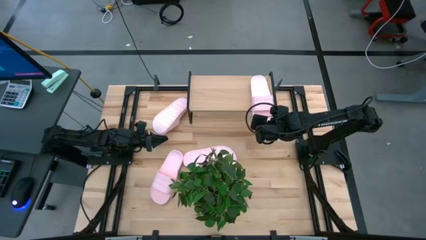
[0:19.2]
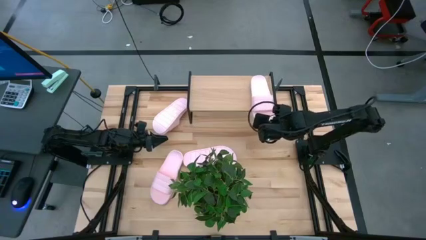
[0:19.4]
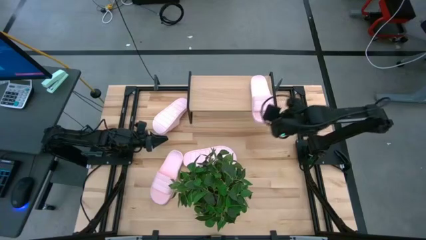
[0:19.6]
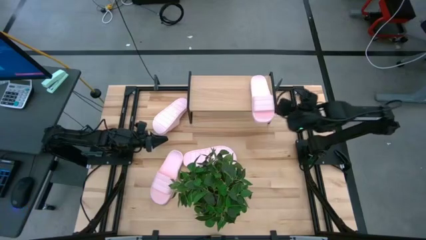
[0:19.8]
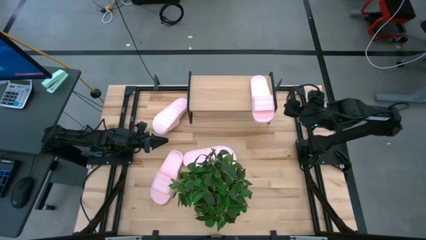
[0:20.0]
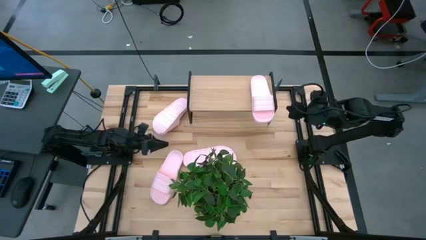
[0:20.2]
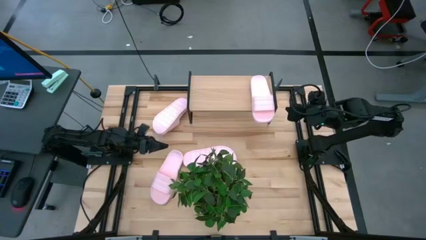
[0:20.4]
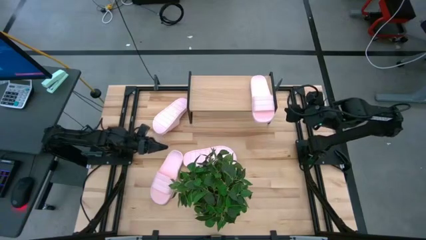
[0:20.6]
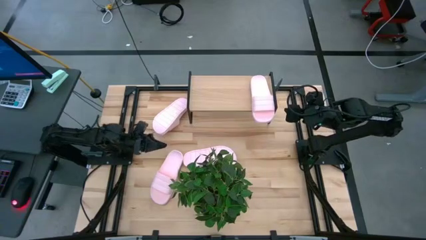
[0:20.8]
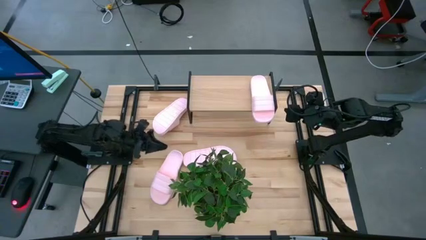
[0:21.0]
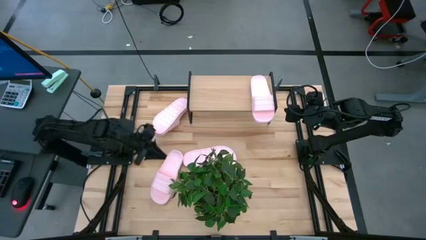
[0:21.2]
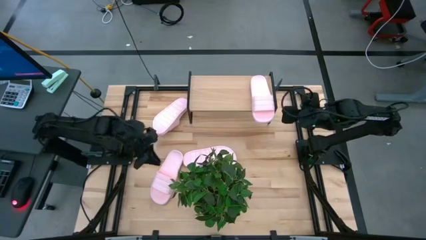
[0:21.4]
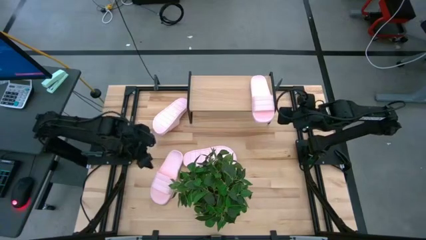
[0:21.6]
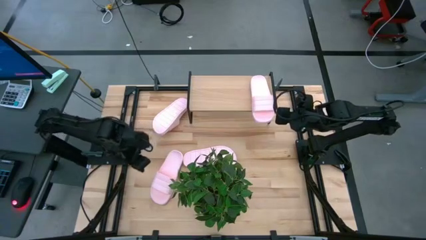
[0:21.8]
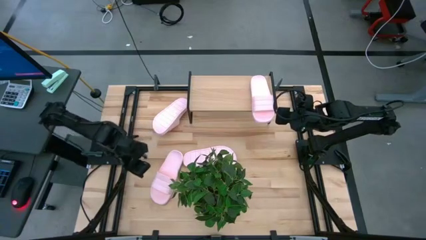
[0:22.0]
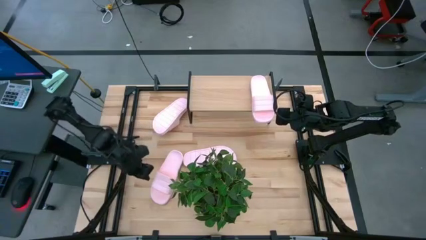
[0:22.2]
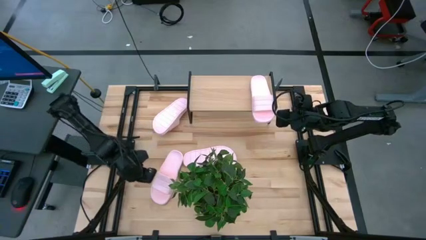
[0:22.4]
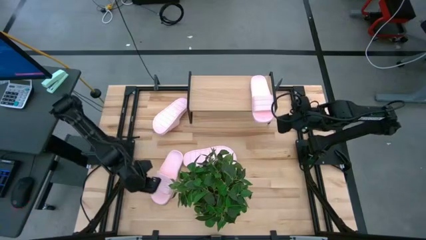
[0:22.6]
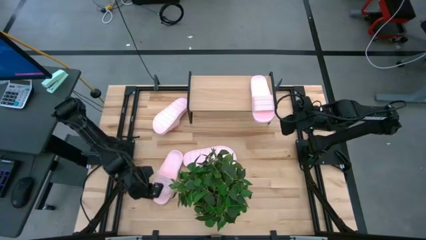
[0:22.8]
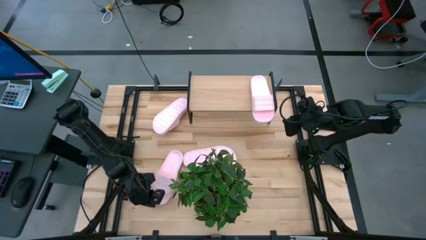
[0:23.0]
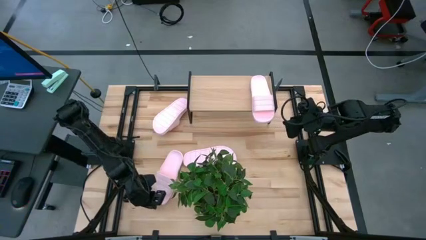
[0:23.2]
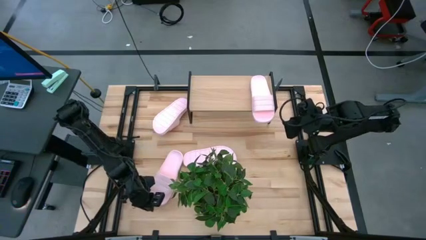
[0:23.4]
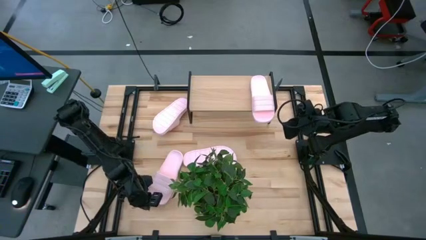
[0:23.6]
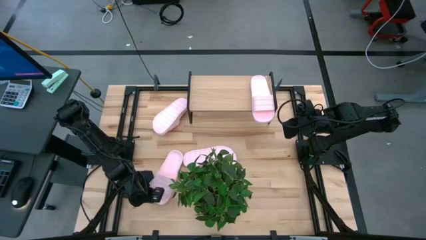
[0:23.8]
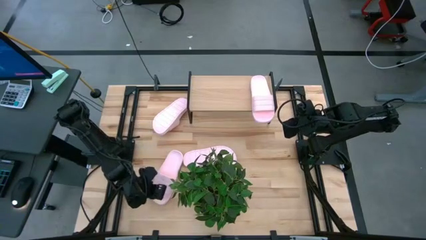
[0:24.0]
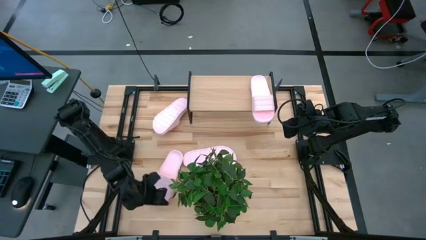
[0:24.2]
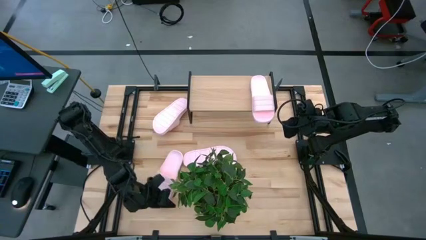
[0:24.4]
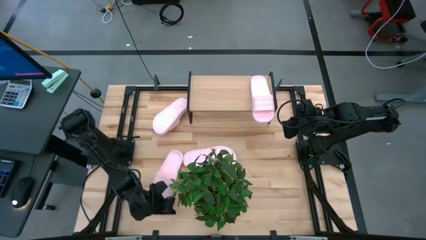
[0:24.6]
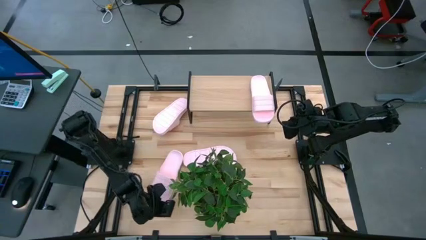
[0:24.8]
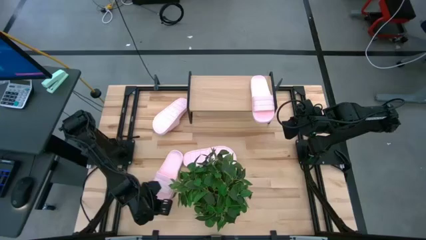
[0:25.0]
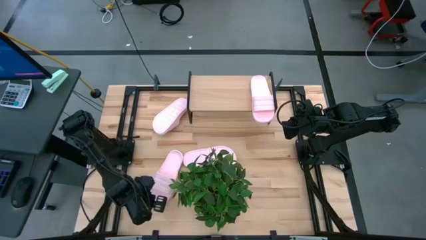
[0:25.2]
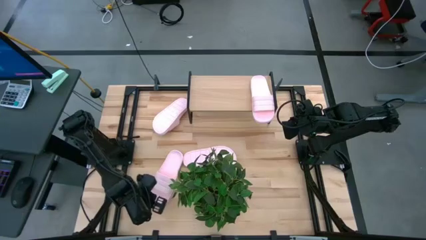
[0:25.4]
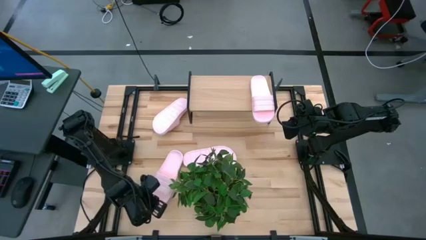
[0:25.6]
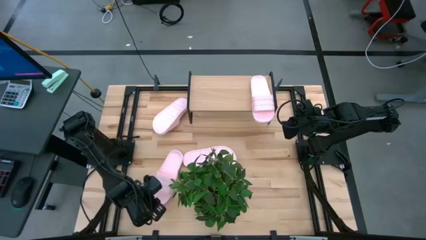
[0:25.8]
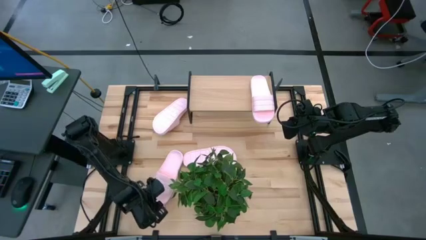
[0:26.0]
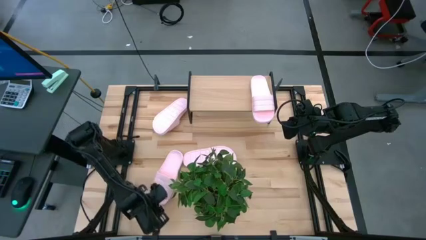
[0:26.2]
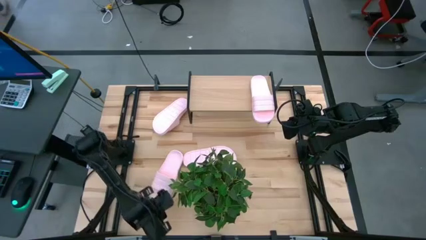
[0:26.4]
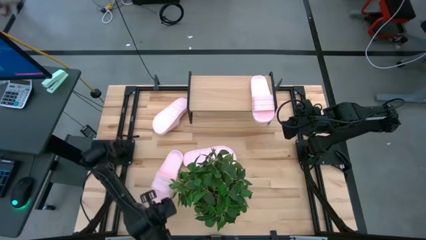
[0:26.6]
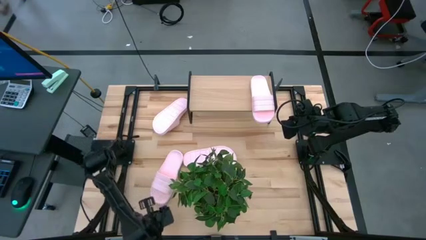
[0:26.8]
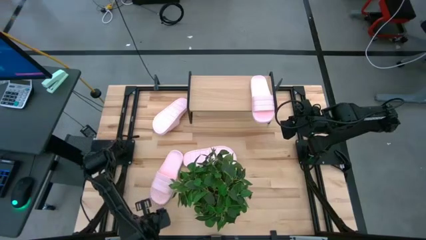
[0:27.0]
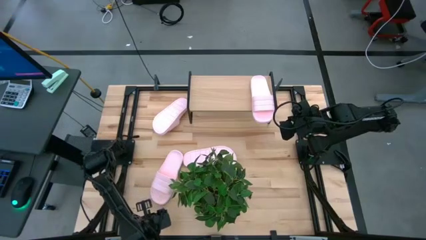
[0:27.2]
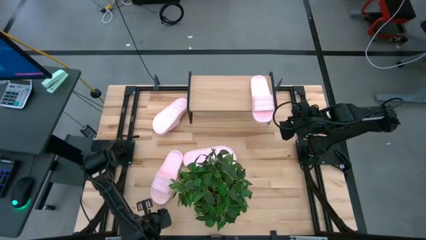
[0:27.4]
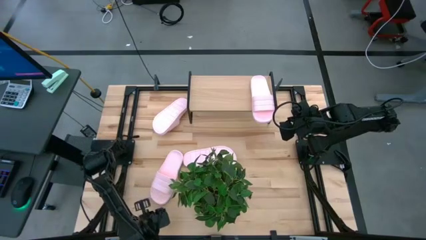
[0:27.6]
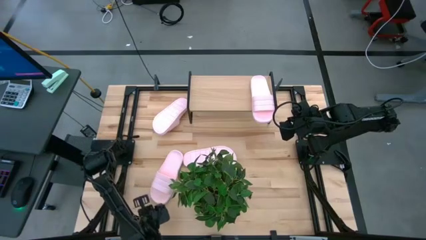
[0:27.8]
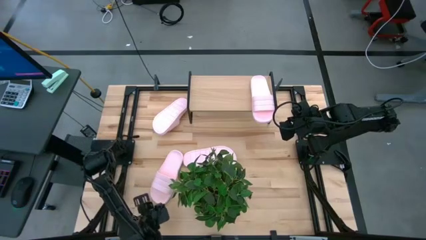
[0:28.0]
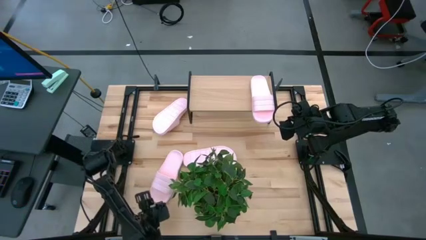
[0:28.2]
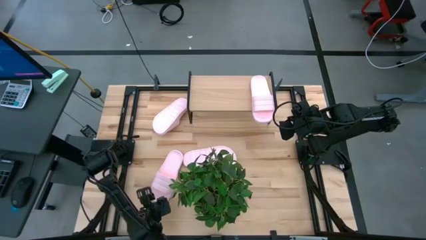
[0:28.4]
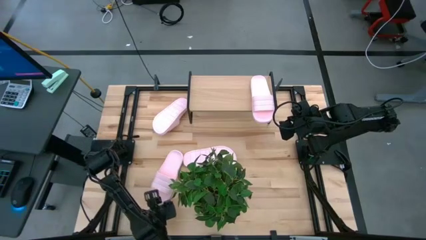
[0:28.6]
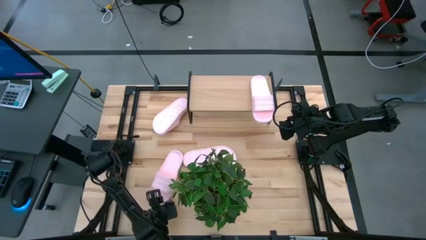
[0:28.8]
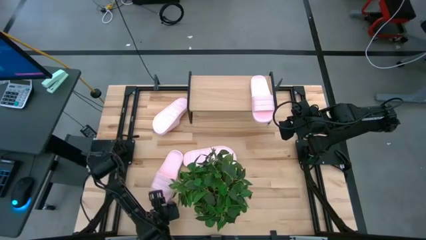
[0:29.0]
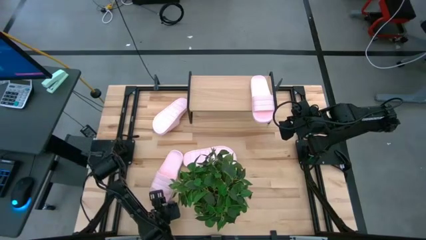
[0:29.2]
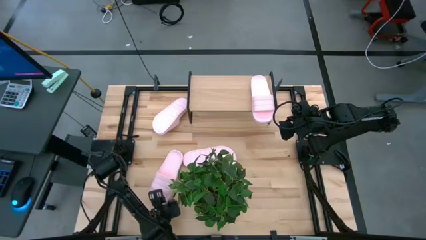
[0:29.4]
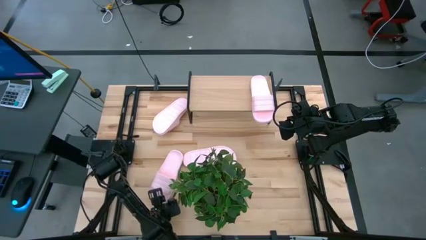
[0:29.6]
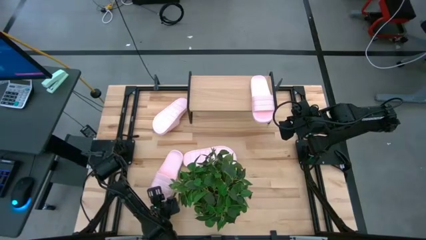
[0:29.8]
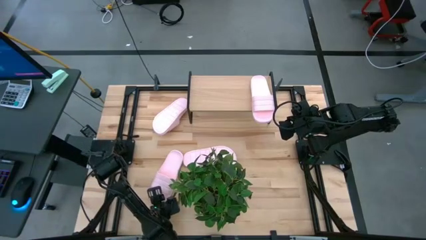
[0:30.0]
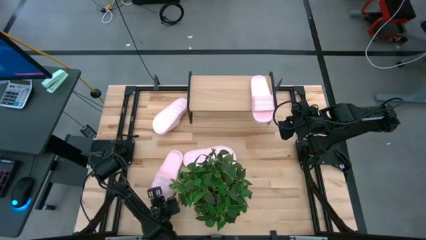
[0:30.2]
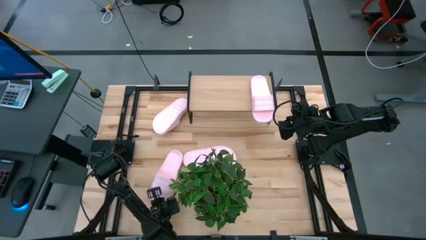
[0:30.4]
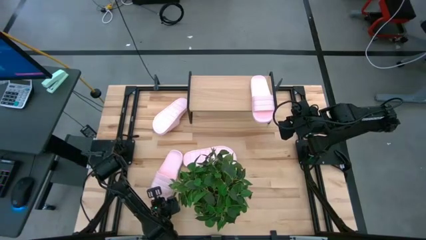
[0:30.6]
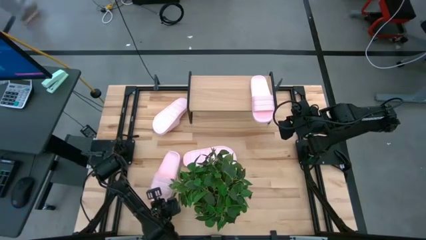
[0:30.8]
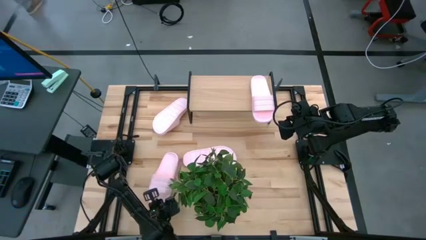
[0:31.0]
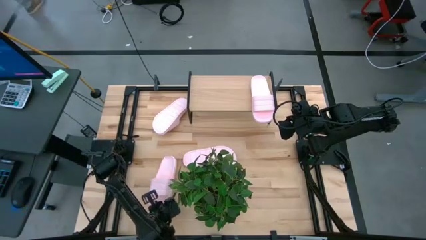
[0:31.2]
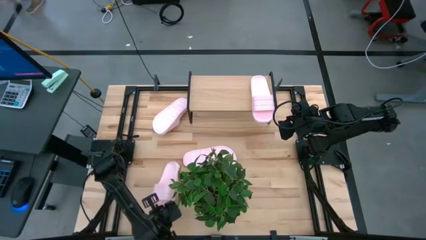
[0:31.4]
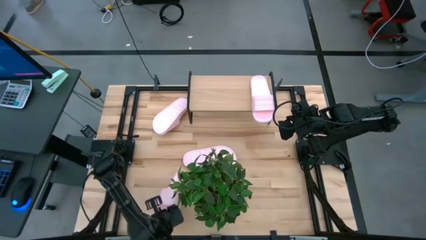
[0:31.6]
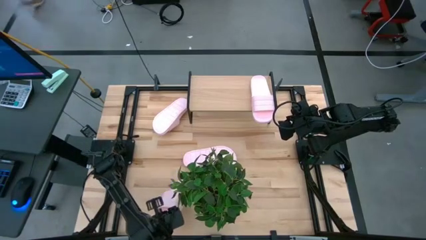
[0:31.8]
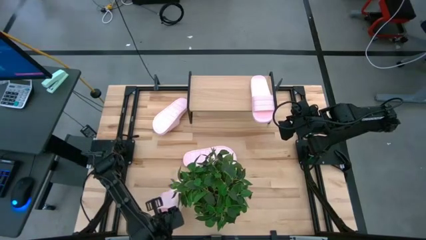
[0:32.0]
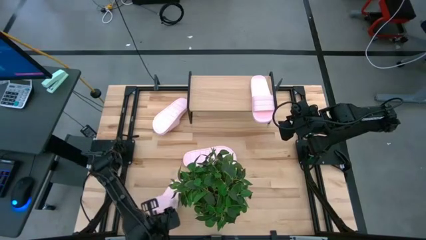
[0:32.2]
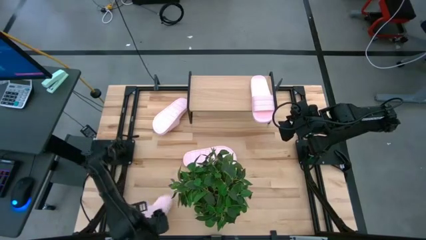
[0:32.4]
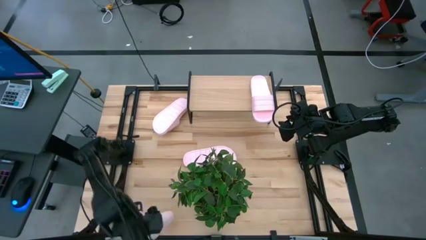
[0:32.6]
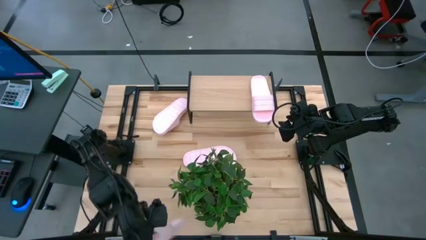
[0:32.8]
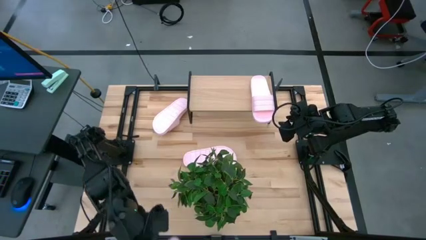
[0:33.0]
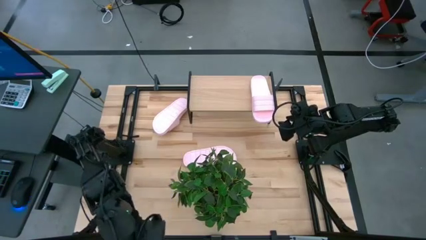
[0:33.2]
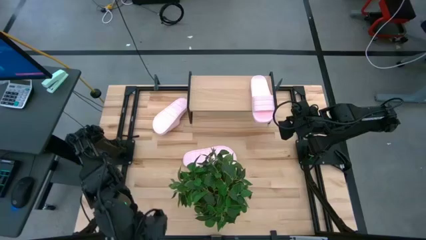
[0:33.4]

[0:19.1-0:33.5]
Task: Pick and place slides into the shelf
Put the bottom left slide on the shelf
